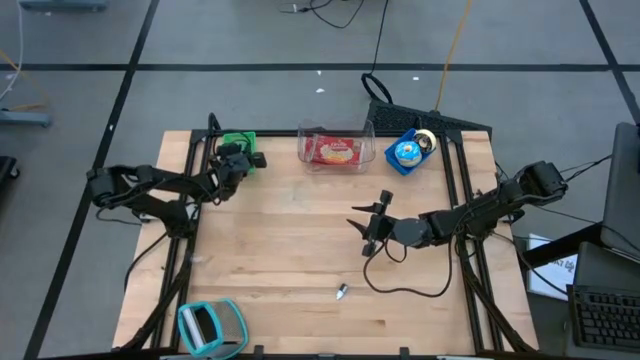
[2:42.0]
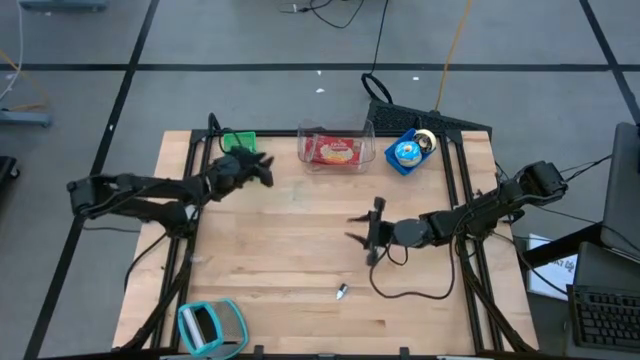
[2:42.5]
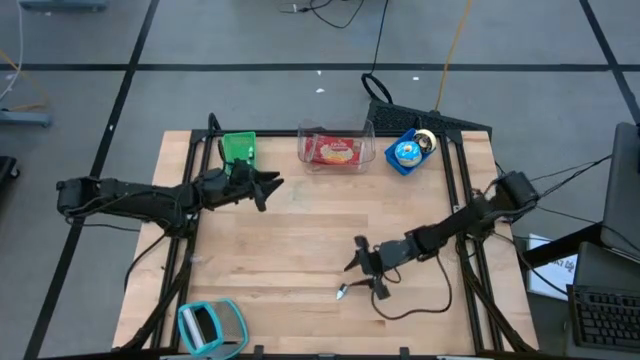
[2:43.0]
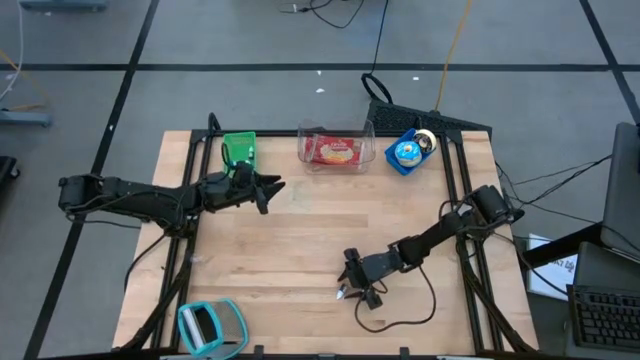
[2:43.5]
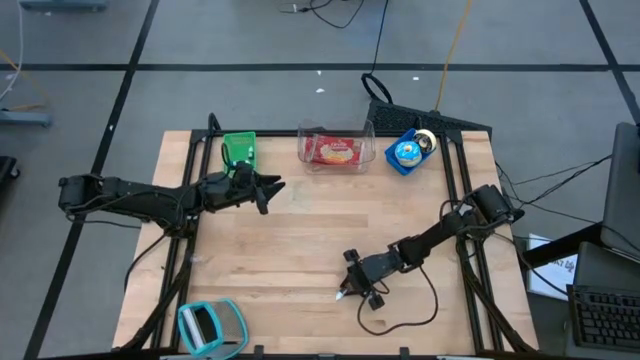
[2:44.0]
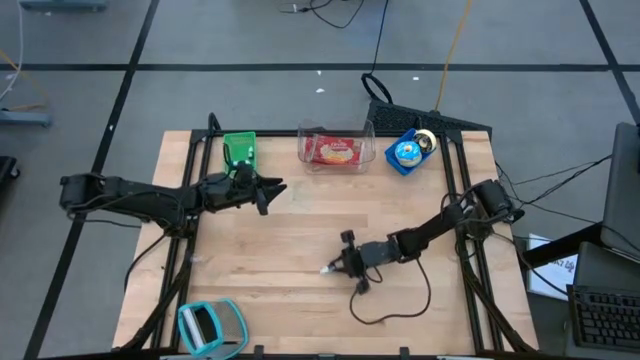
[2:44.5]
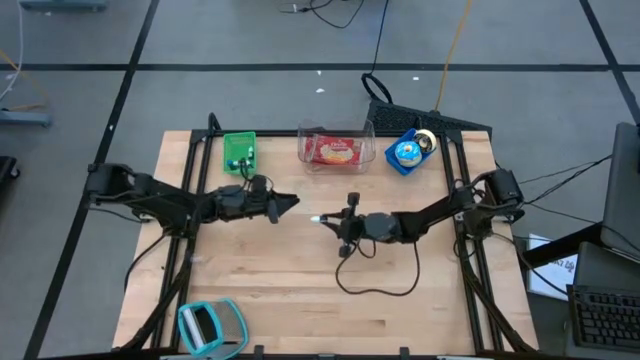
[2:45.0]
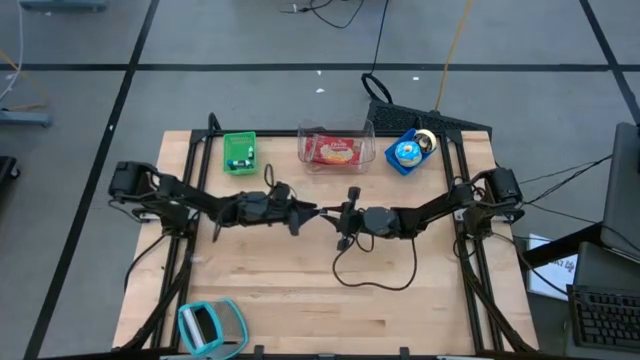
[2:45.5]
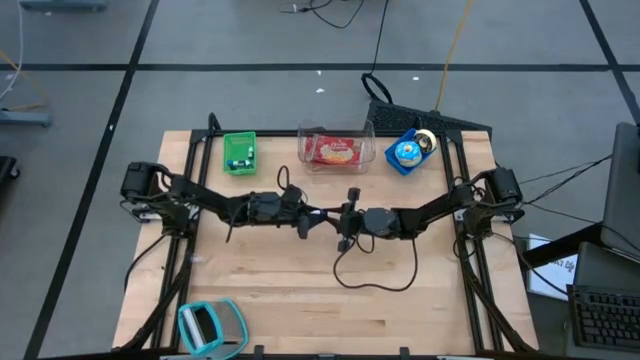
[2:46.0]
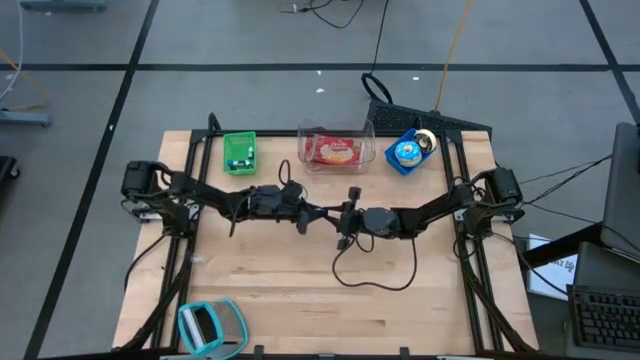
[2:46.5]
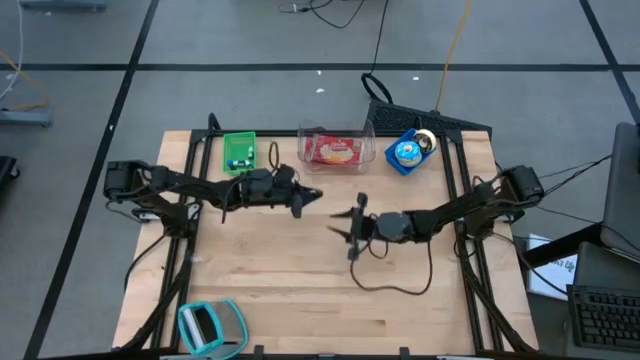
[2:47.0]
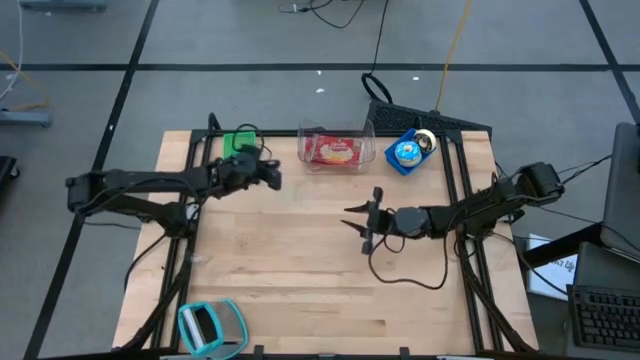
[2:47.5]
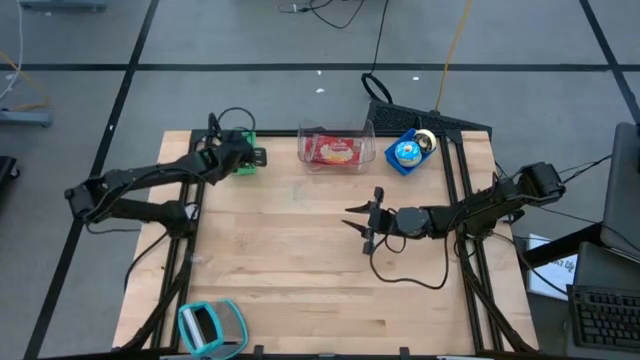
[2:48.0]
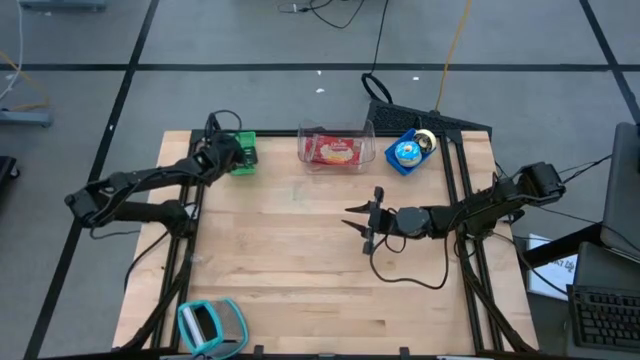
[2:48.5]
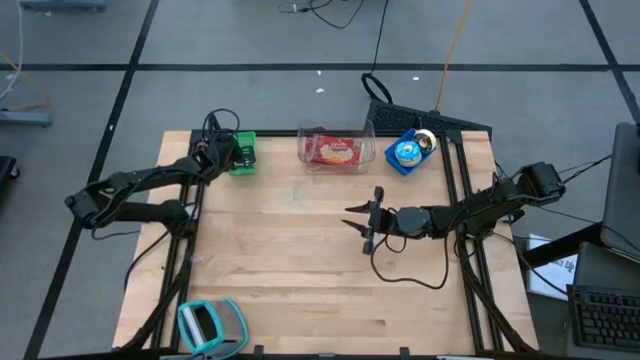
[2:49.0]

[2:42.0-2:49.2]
Put the voilet food coloring bottle into the green bin

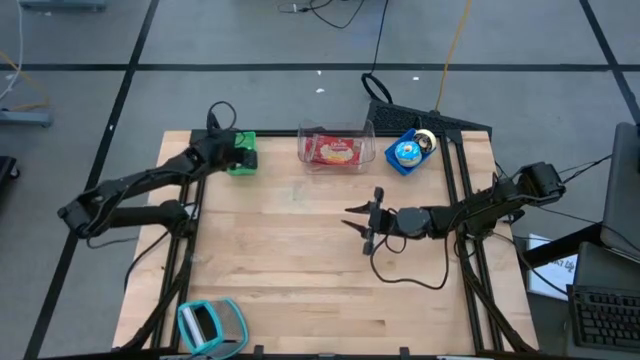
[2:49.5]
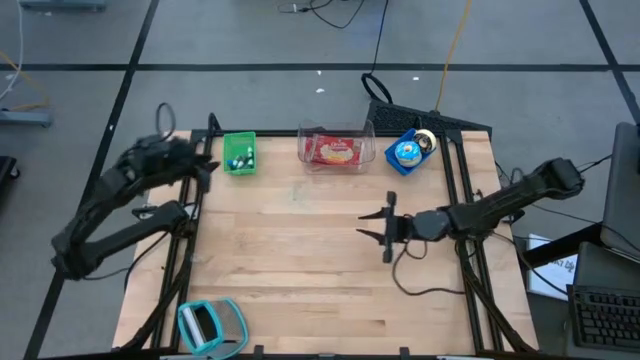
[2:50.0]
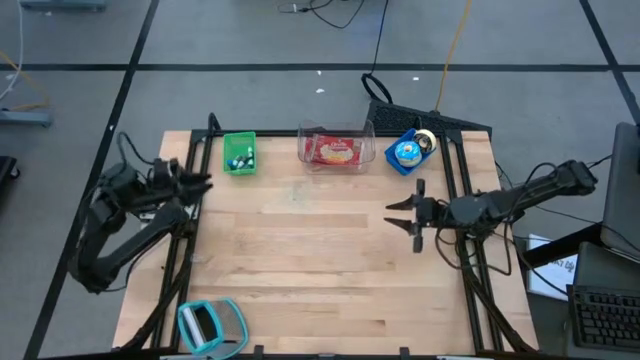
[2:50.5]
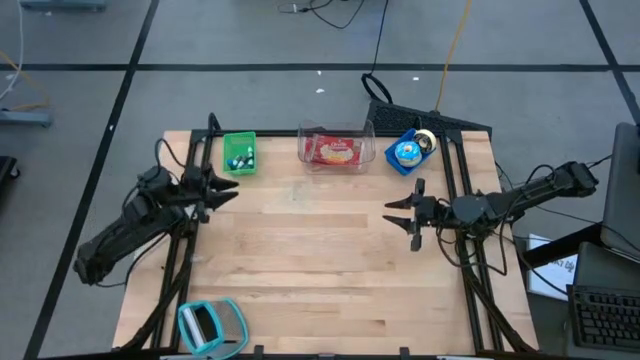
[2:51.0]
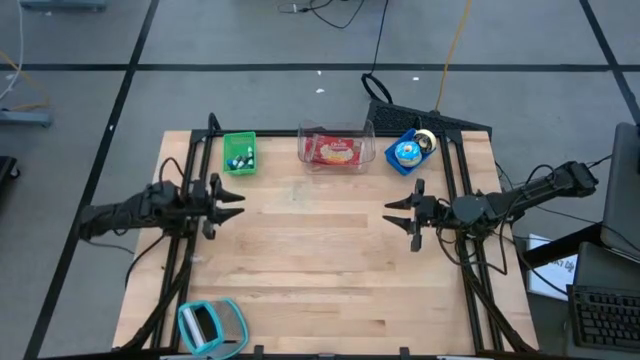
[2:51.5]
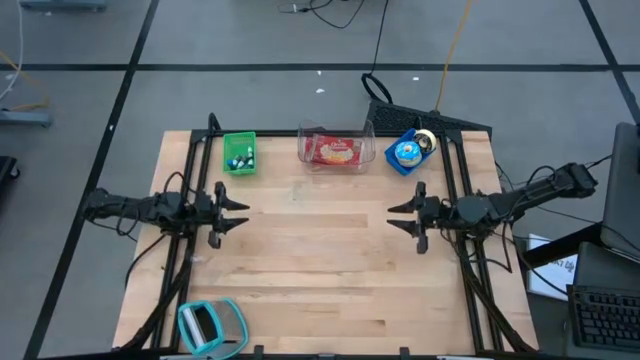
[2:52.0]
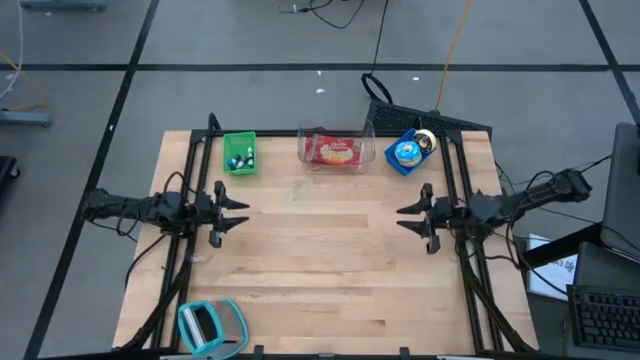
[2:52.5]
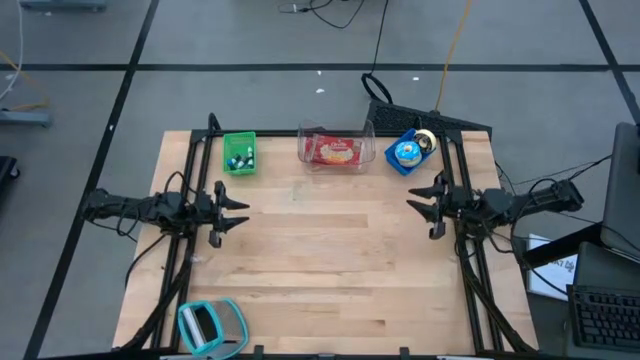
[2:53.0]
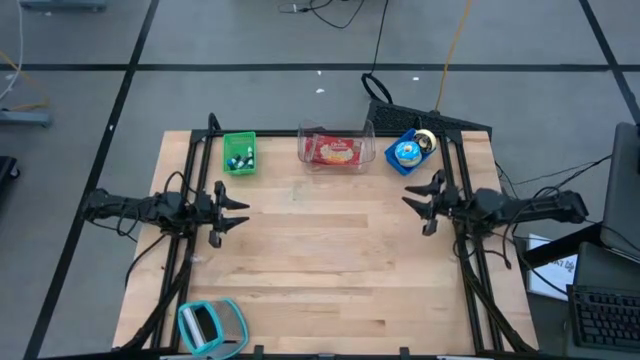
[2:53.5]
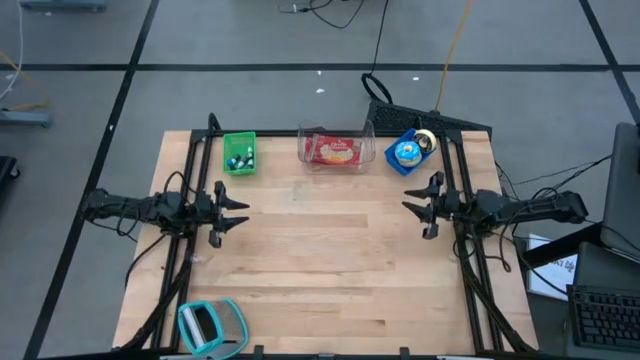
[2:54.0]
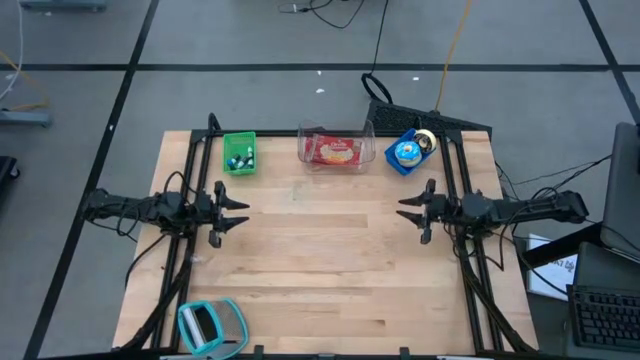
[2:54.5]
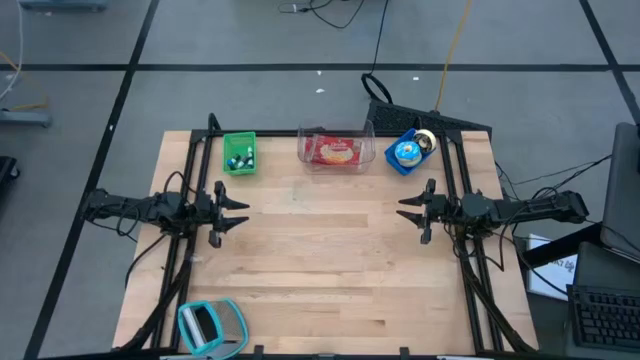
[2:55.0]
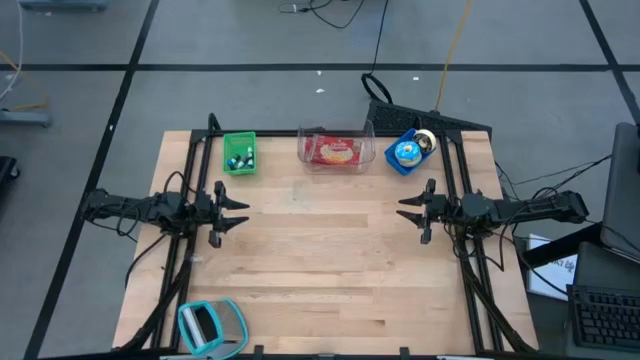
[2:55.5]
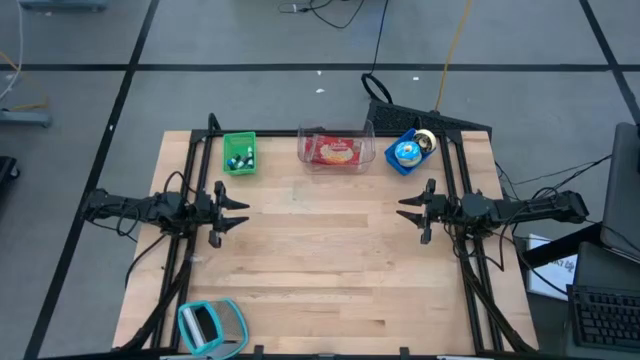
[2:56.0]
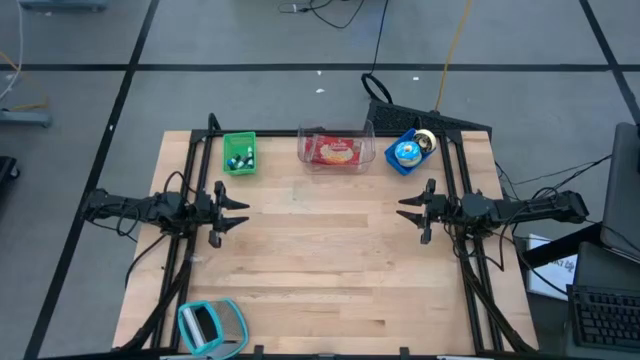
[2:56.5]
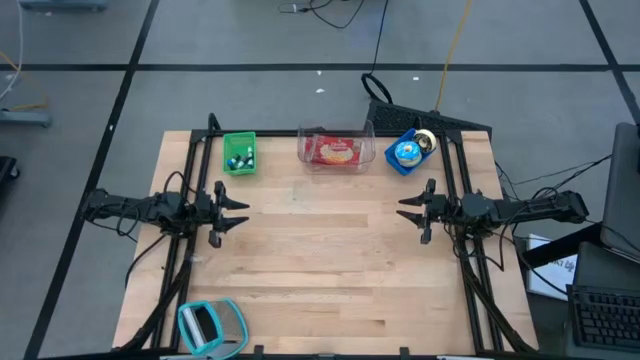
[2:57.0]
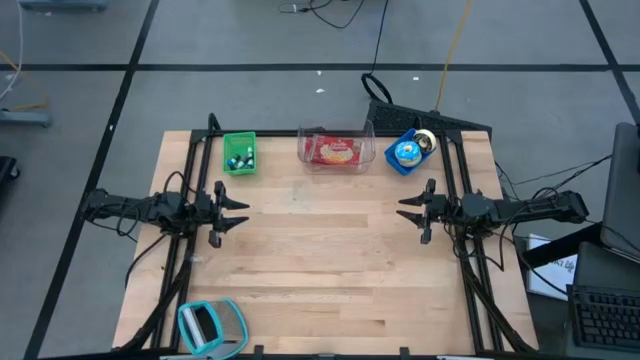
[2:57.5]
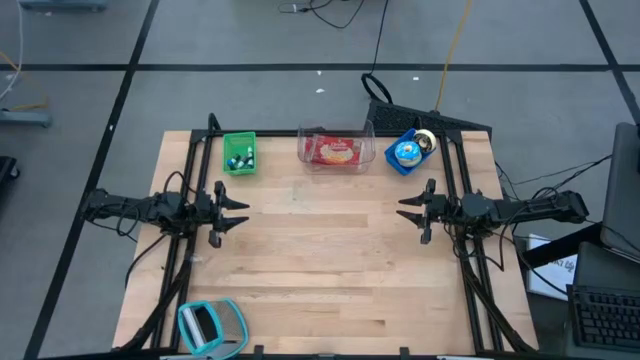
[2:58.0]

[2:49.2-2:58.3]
Return to Home Position
